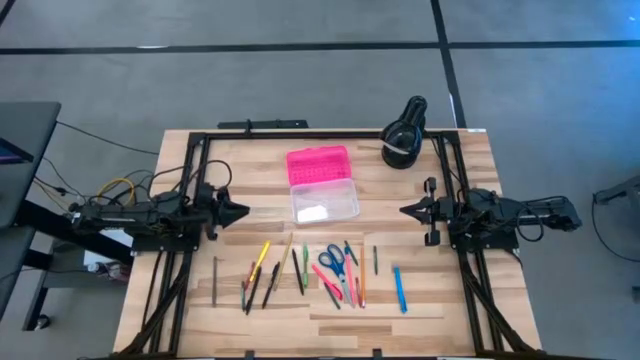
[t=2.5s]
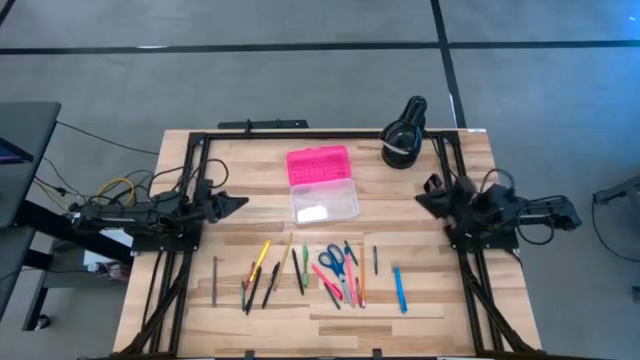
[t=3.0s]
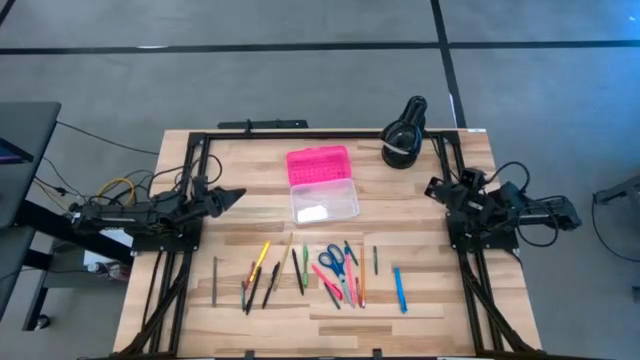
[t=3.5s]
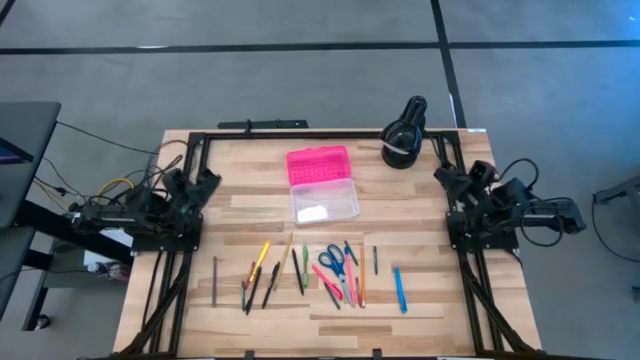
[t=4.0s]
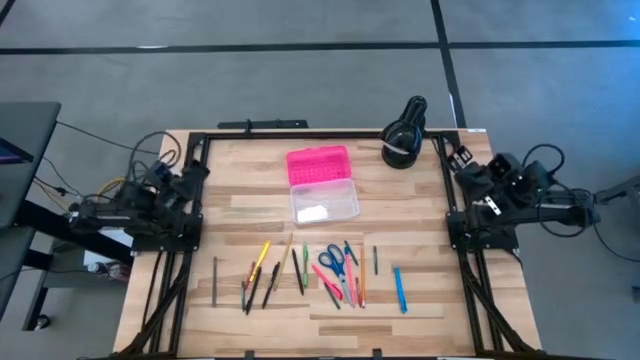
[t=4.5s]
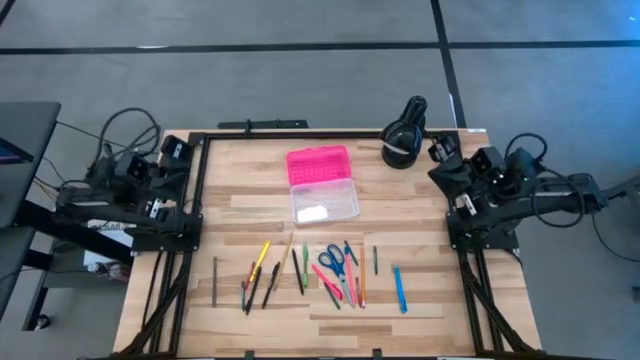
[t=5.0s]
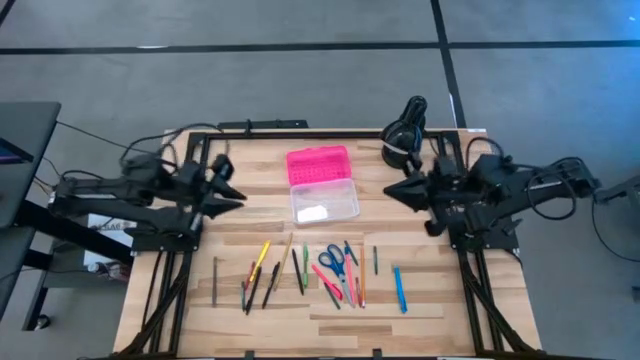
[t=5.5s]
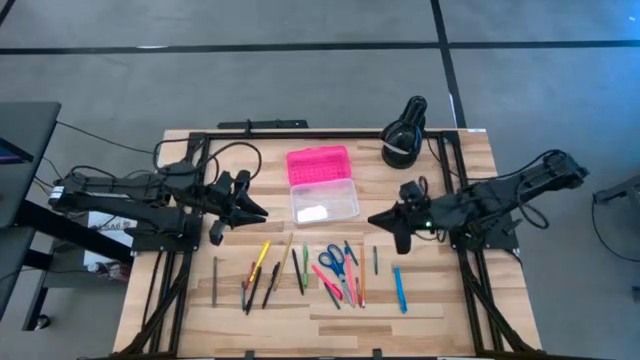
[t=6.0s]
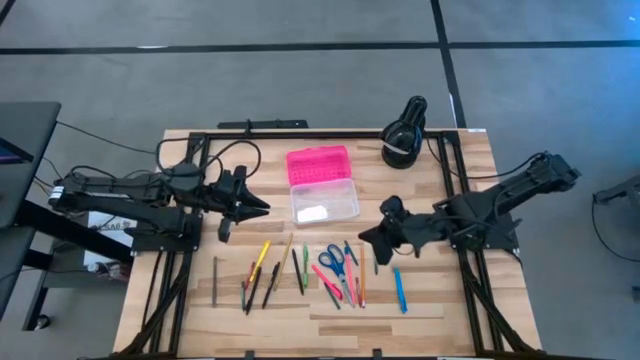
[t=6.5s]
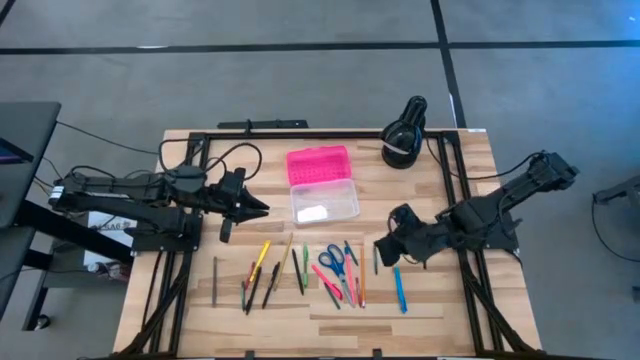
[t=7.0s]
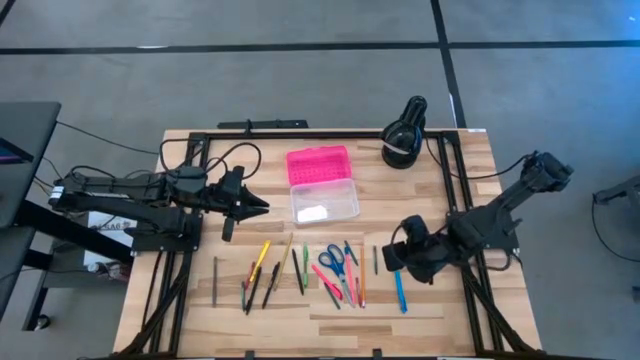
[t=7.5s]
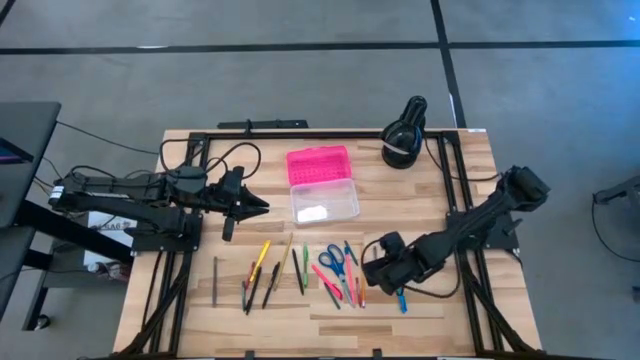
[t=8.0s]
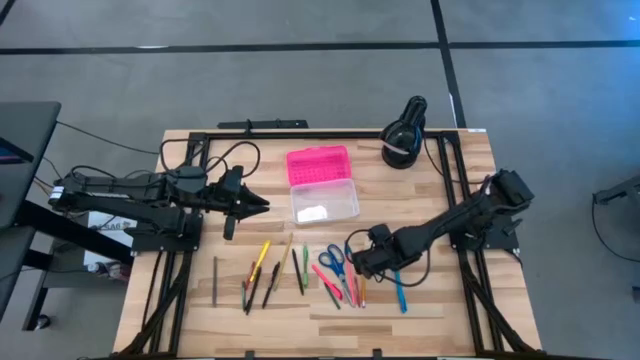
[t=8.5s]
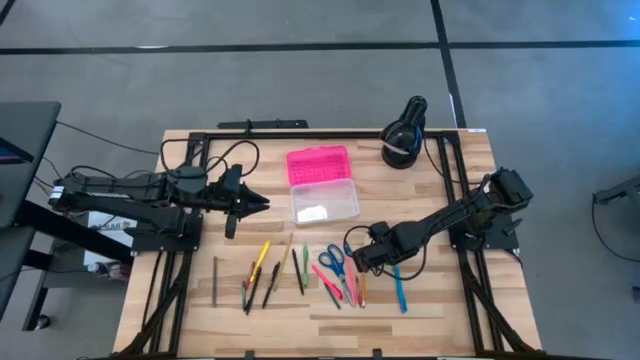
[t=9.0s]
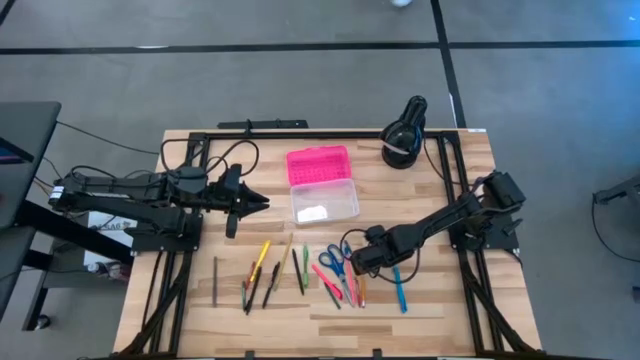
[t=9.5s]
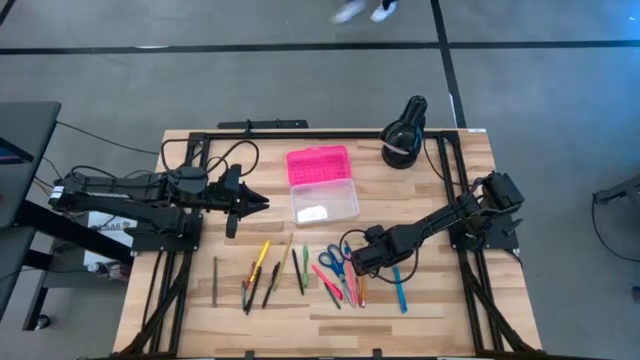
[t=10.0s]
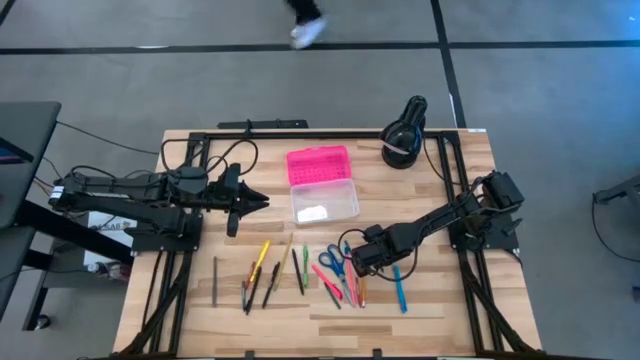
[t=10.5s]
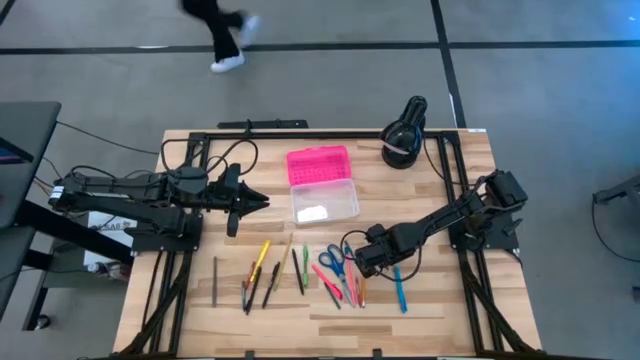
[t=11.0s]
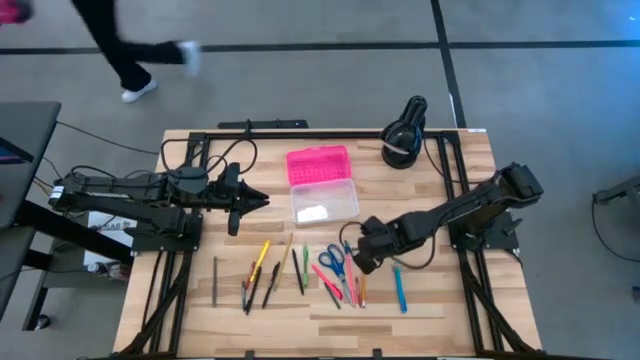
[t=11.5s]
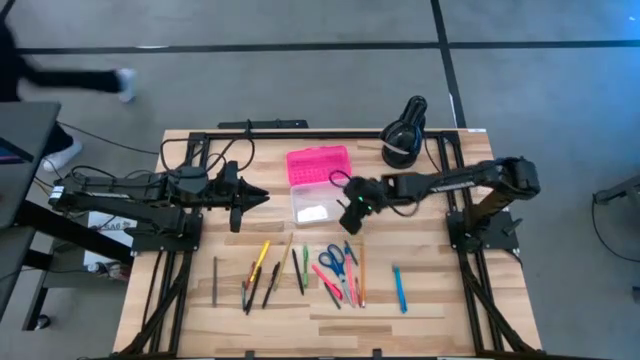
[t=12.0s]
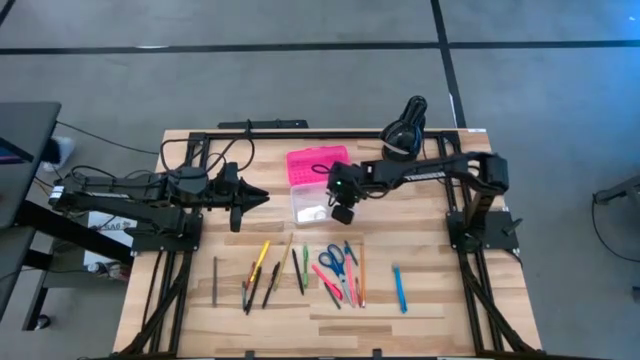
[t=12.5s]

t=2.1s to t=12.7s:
Task: Pick & place school supplies into a supply box
Put the green crayon into the pink supply box

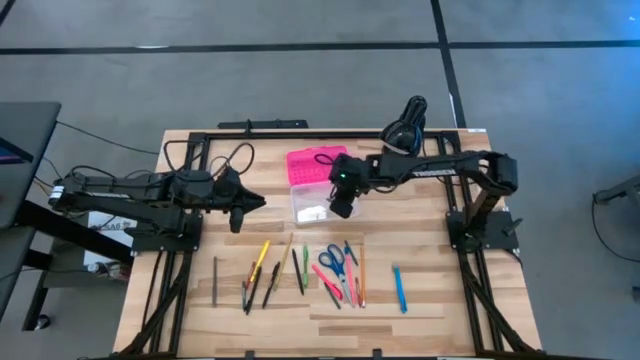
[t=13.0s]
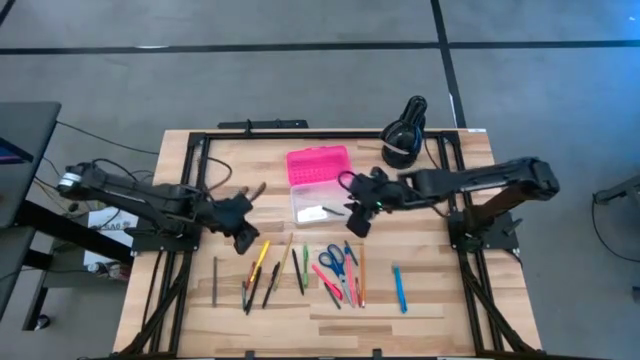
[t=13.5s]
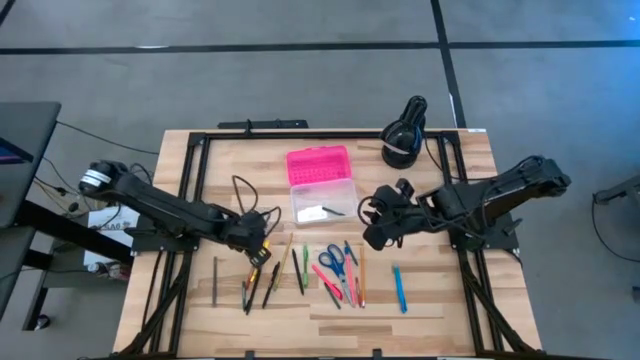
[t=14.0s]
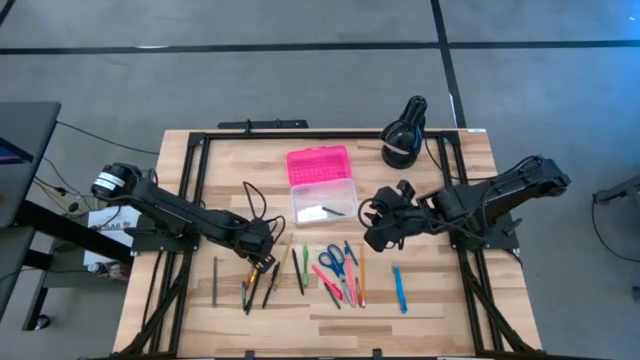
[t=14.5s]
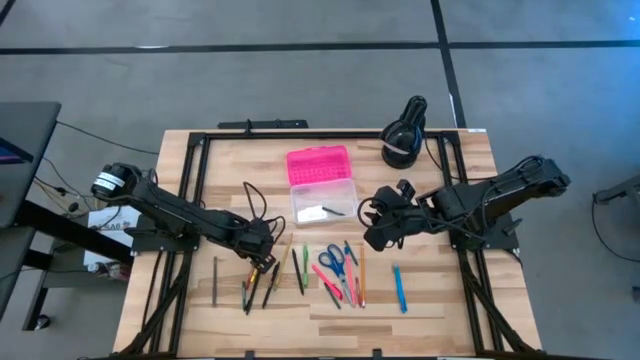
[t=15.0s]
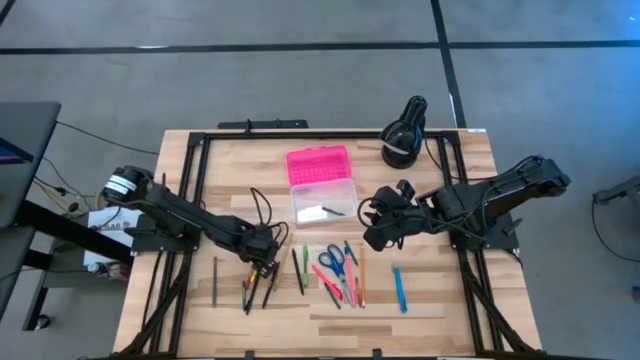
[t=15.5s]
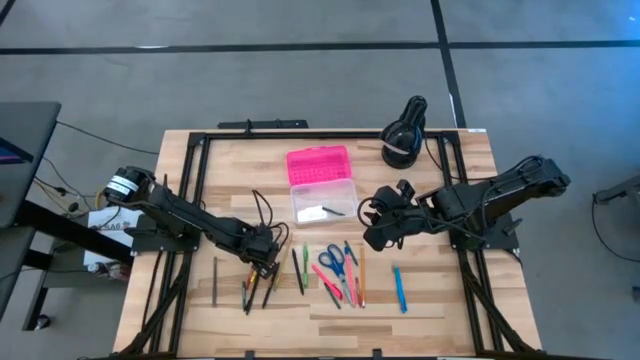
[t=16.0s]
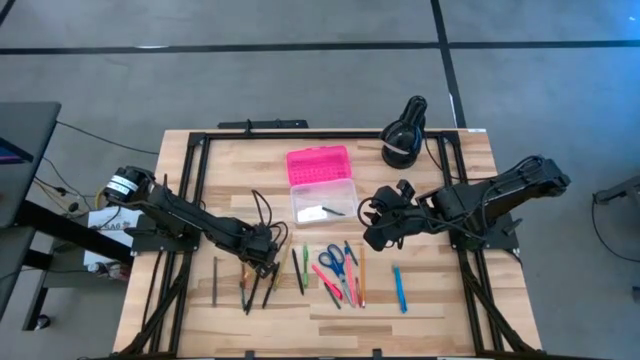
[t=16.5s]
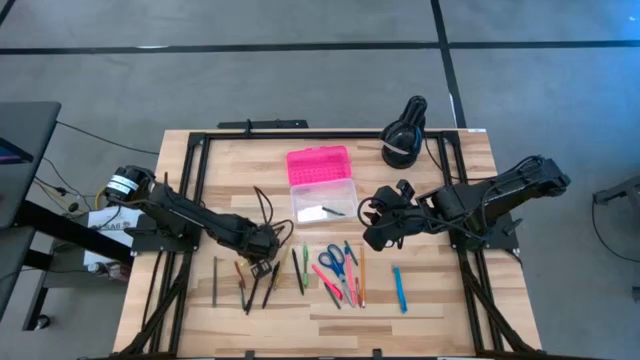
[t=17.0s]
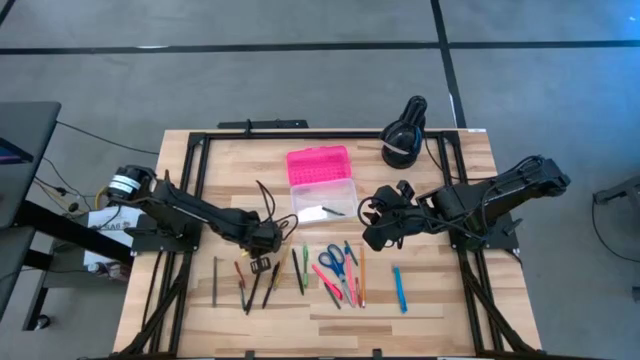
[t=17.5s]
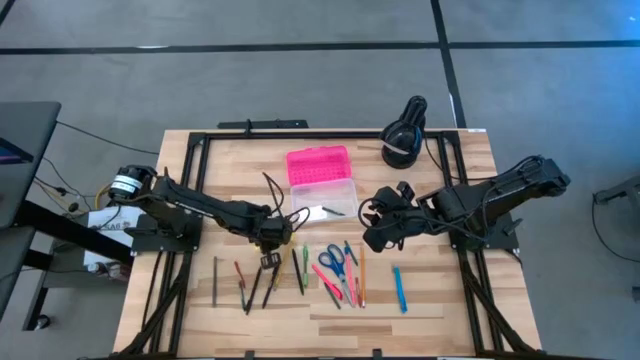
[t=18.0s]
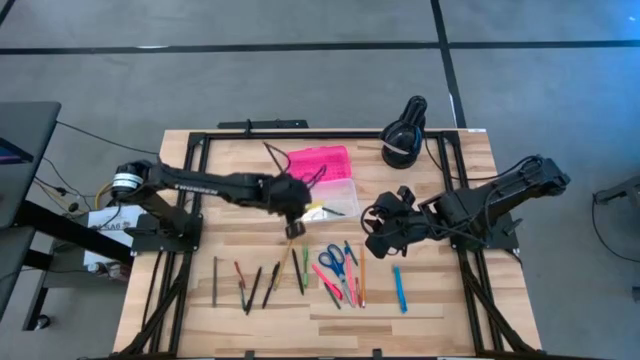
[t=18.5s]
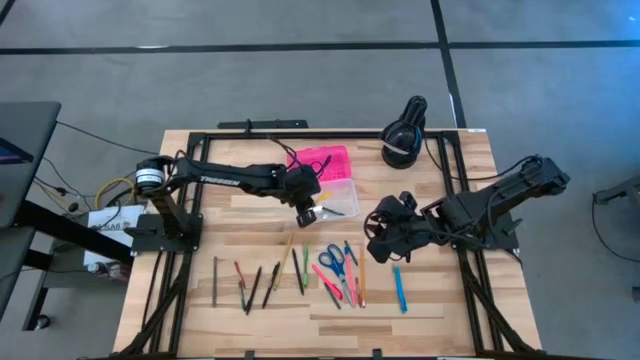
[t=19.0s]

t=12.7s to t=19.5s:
Put the yellow pen into the pink supply box

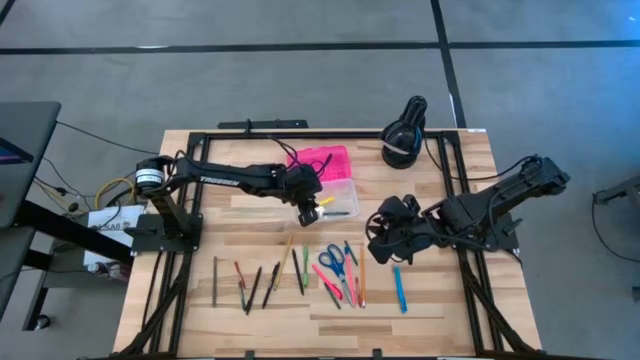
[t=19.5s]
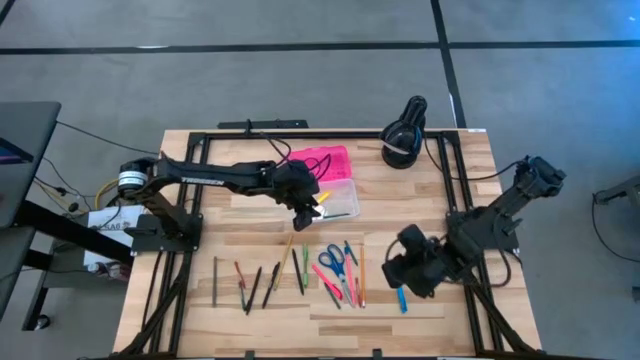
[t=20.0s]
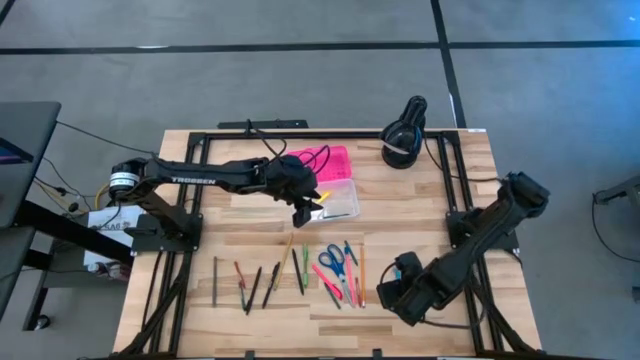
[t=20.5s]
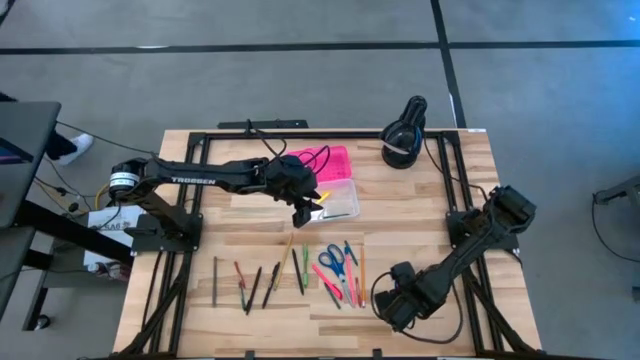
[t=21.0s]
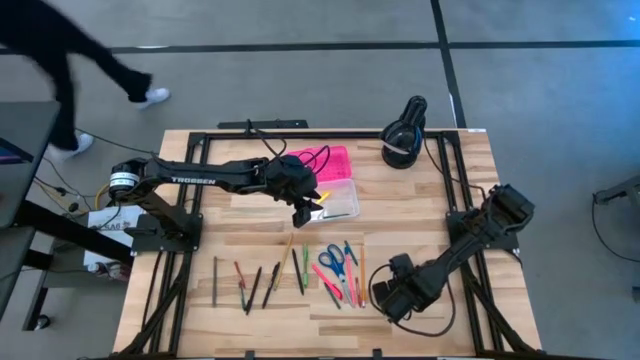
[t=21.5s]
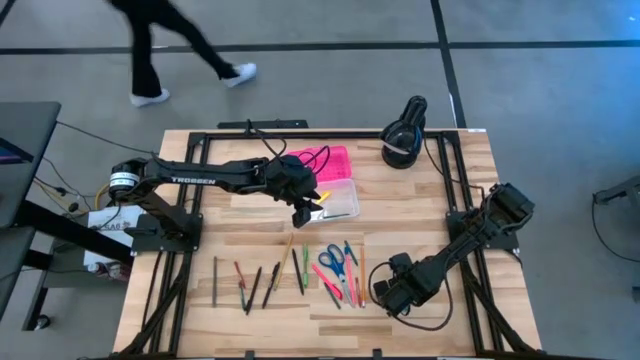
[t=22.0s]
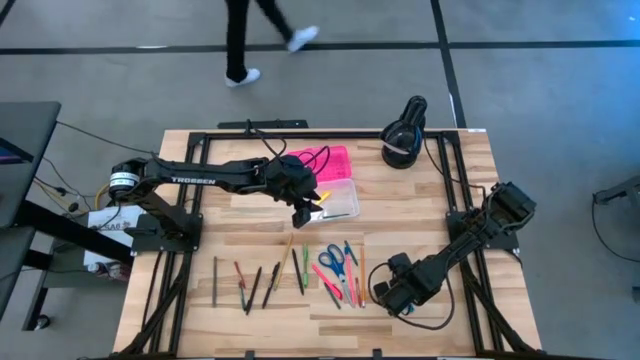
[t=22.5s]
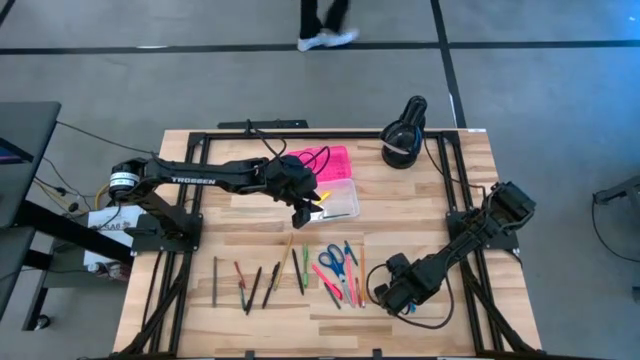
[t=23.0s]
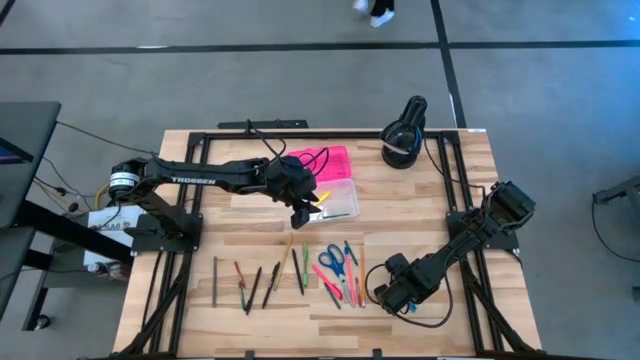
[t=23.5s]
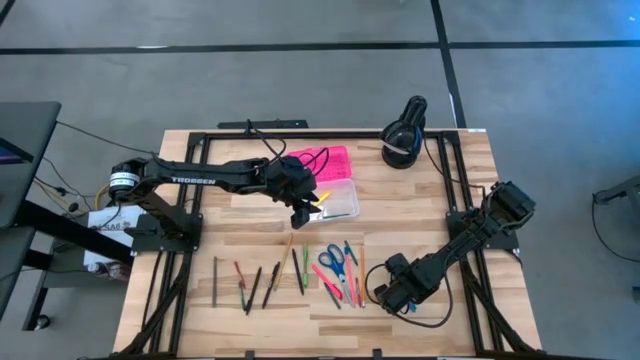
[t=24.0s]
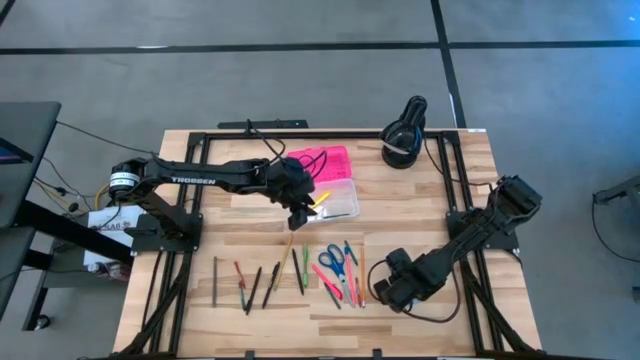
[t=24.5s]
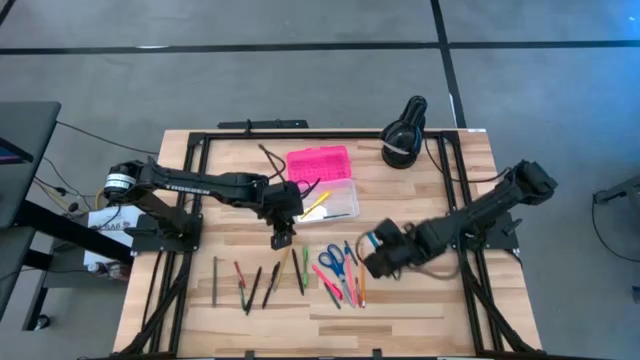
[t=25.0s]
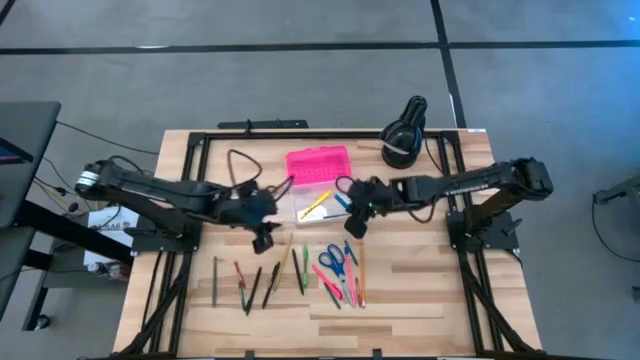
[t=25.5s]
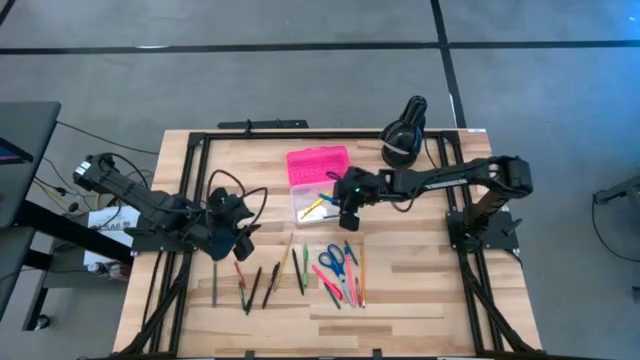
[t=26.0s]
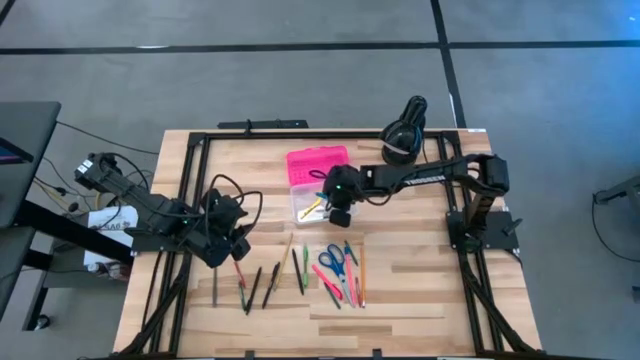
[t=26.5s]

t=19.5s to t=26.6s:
Put the blue pen into the pink supply box
